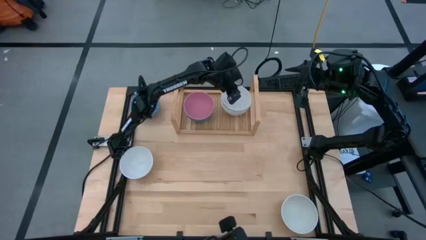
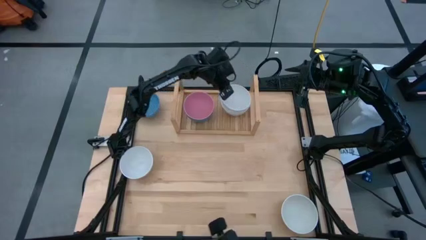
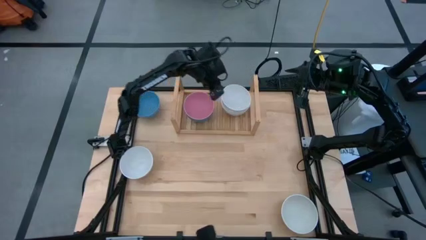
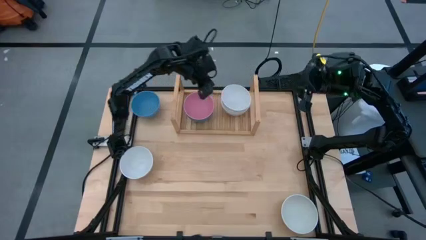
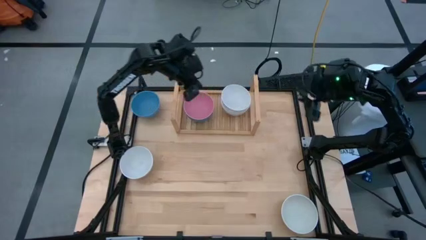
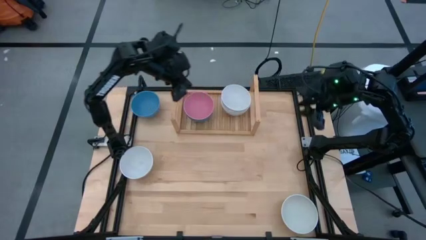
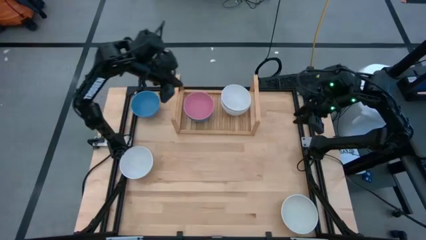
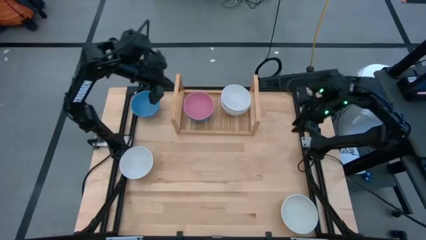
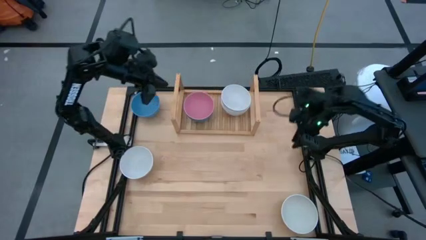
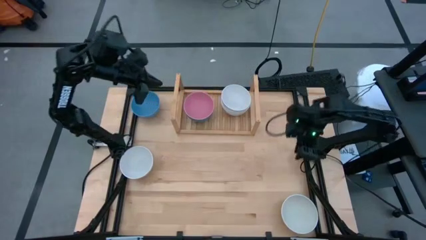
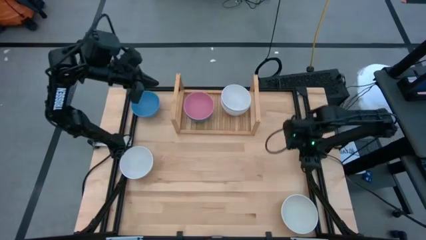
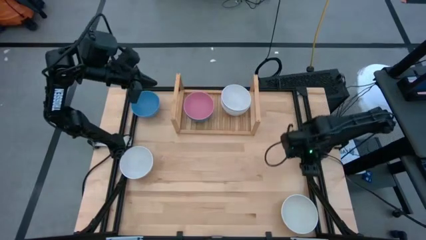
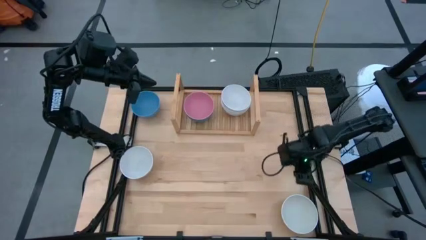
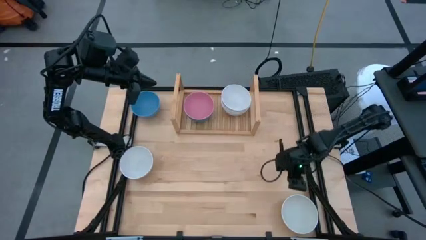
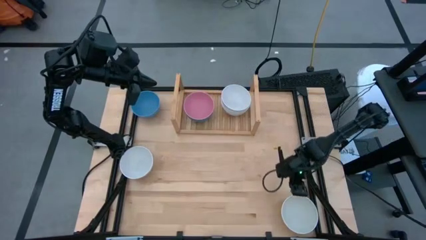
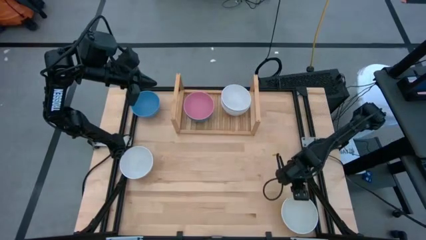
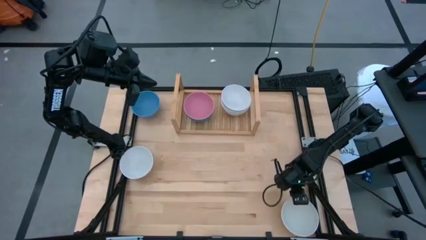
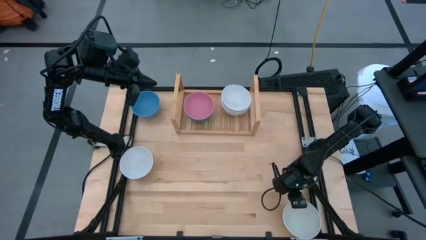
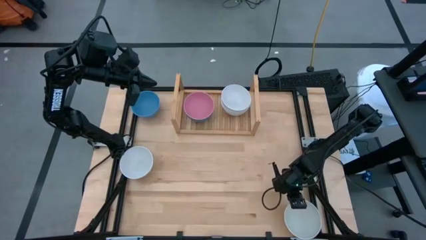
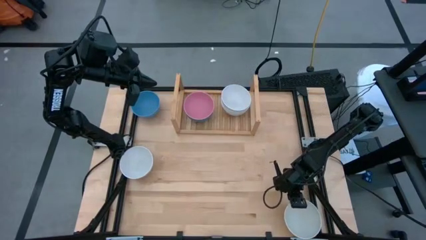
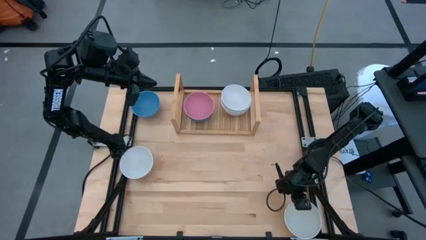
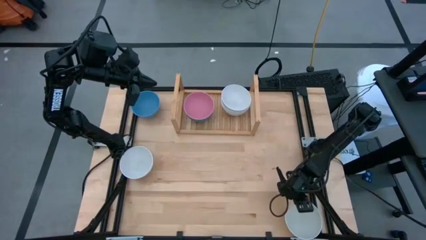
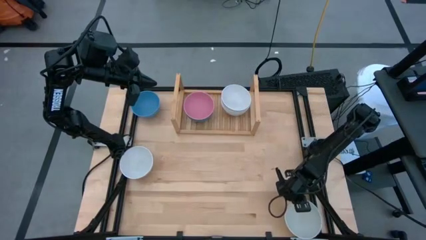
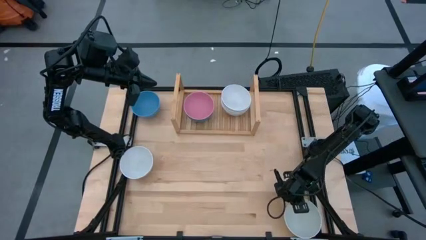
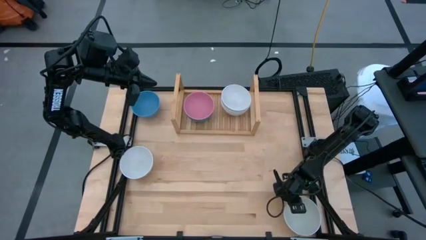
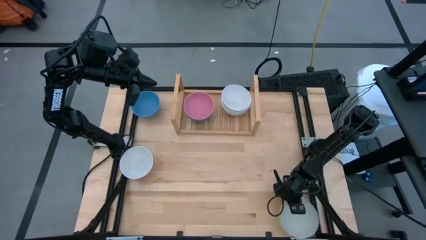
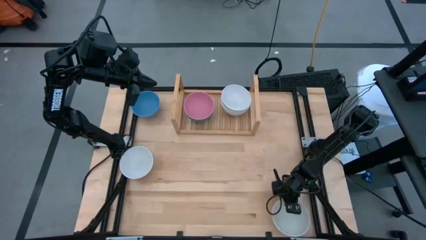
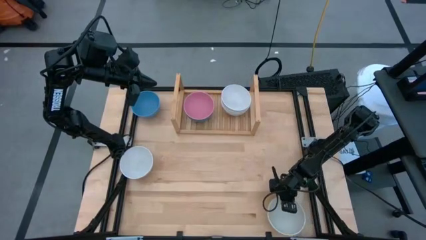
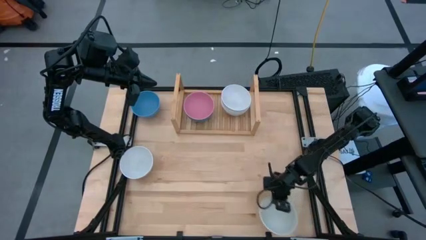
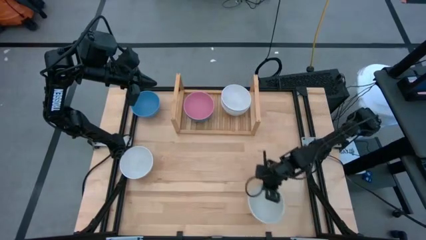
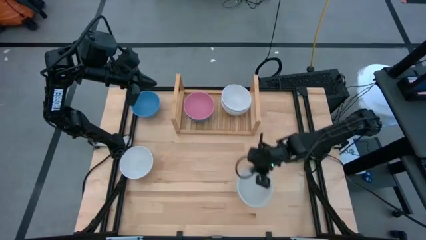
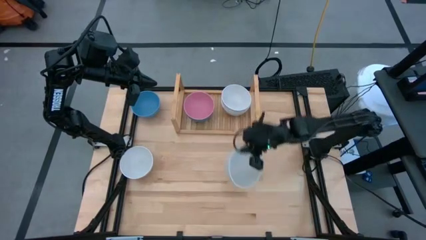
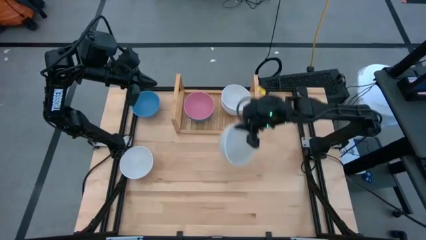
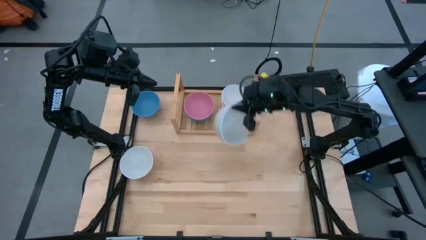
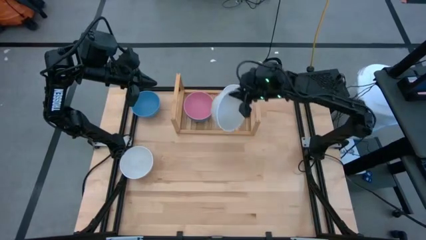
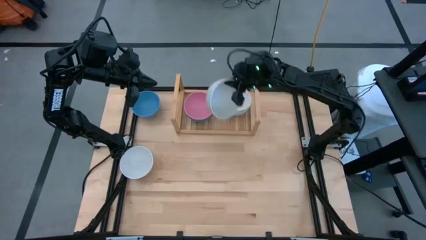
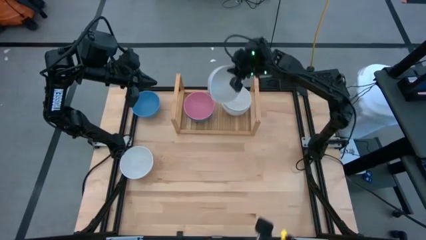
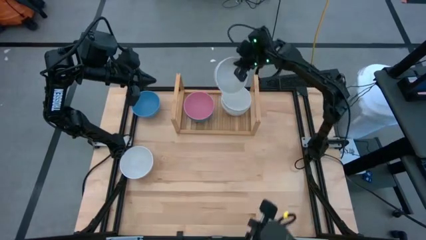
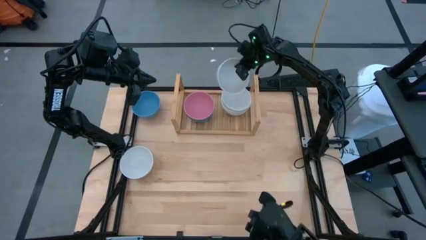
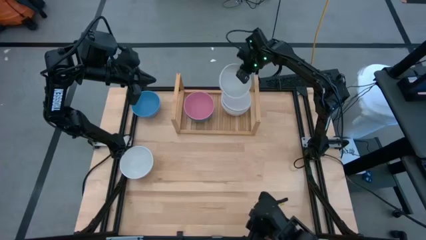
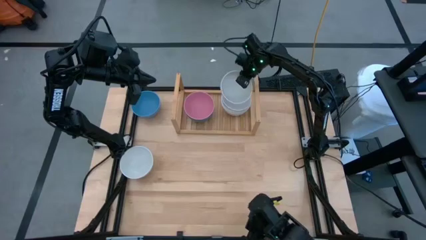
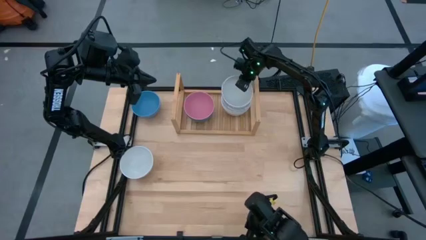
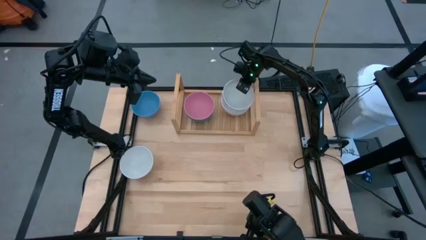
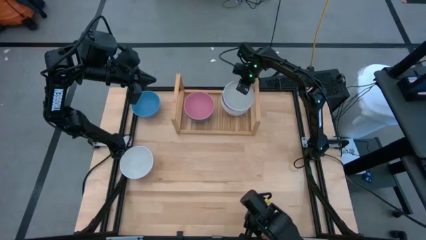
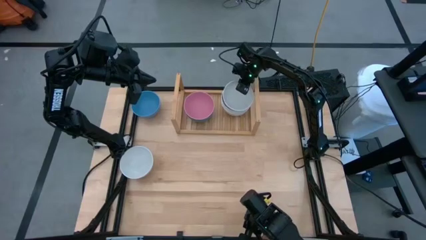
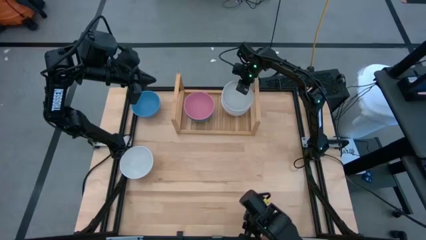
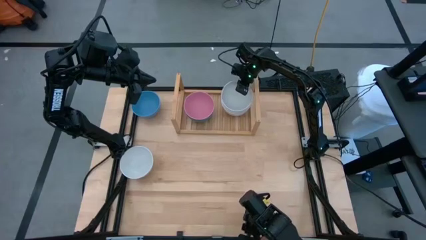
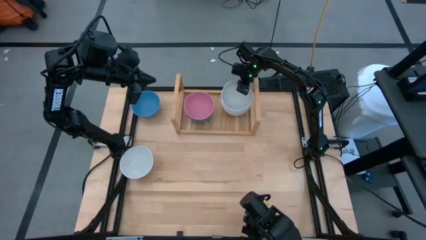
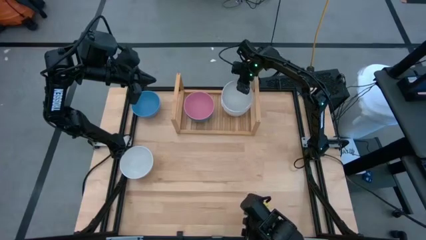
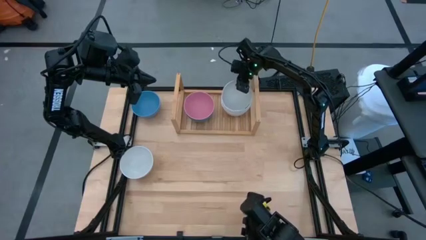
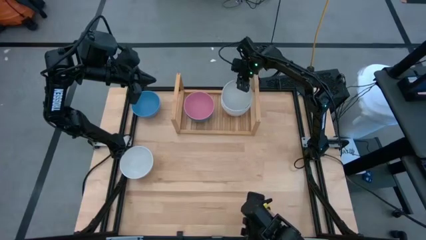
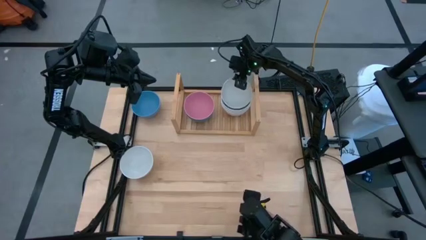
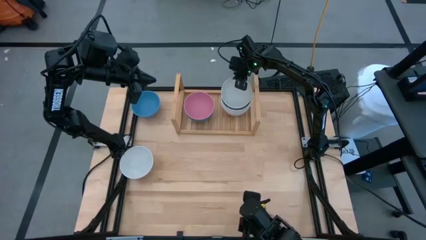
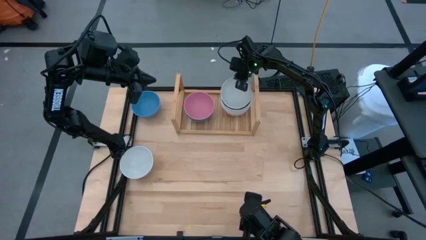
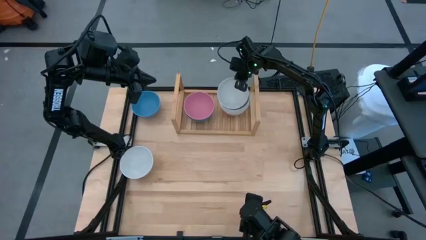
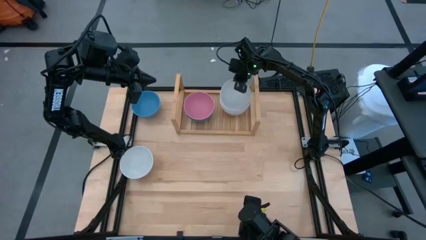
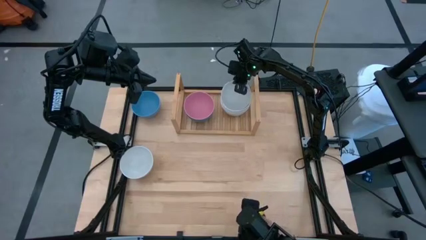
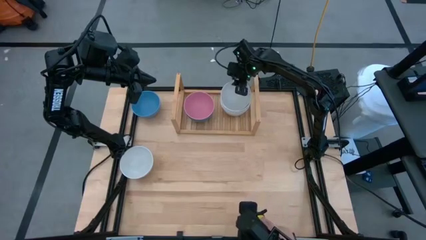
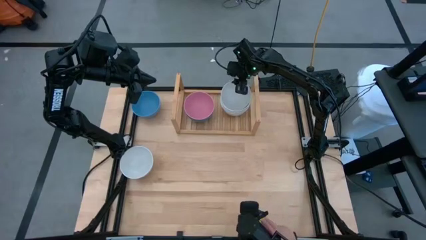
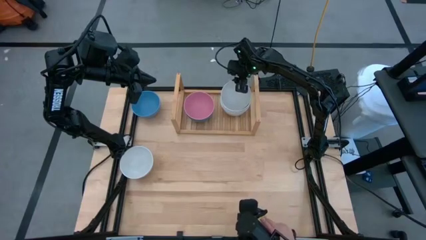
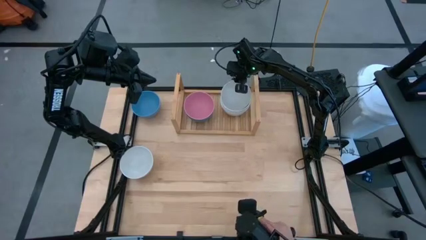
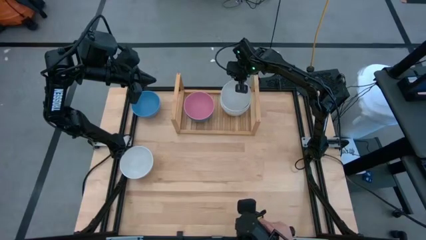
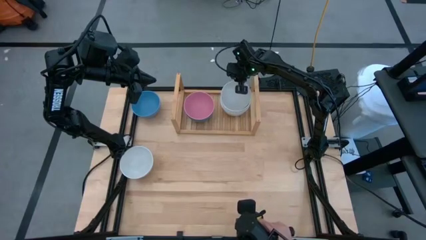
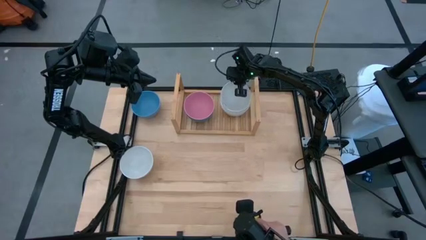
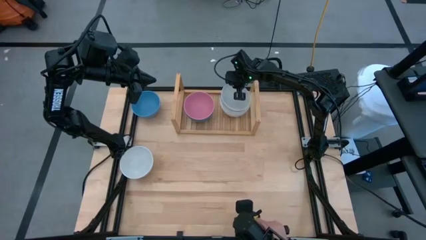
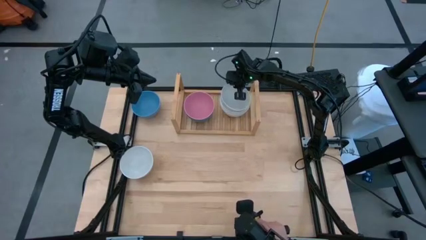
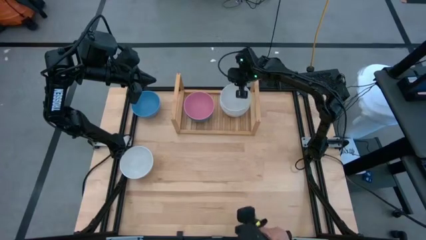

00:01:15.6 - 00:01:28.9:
Task: Place and stack bowls onto a shelf
Stack the bottom right white bowl on top of the other white bowl on the shelf
